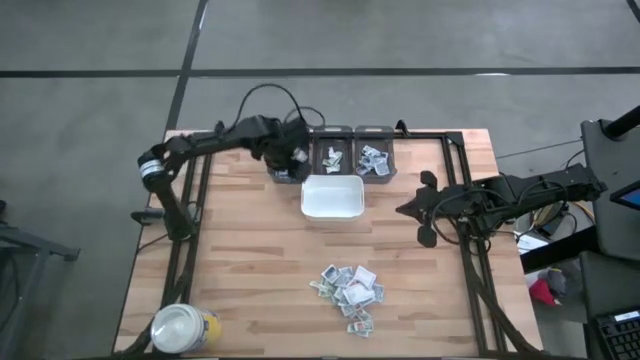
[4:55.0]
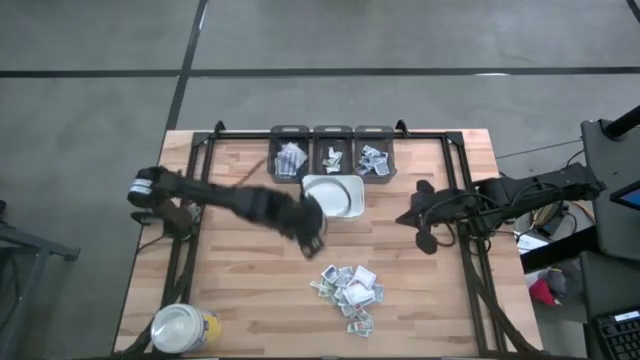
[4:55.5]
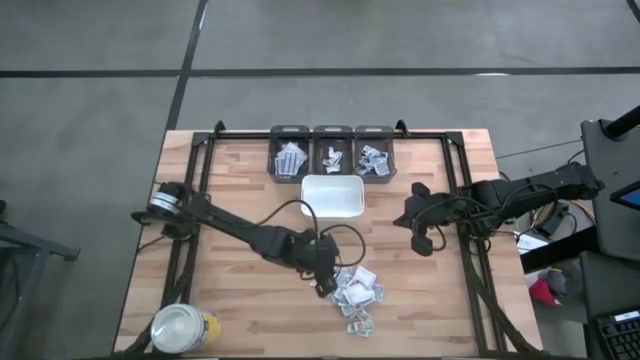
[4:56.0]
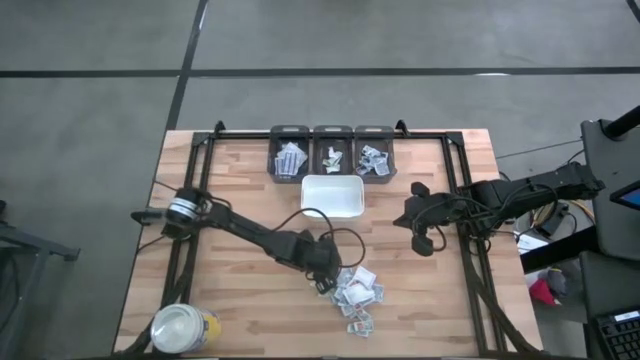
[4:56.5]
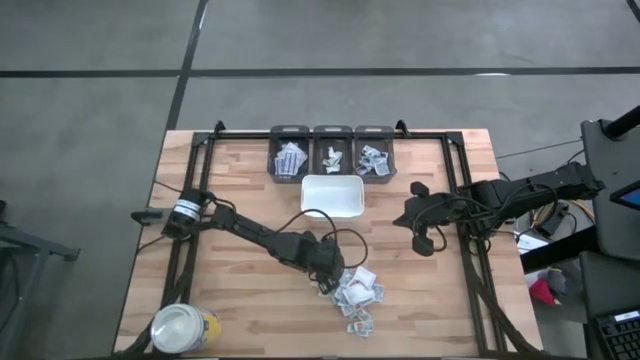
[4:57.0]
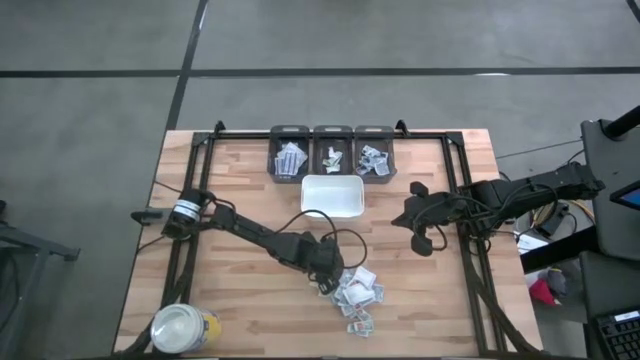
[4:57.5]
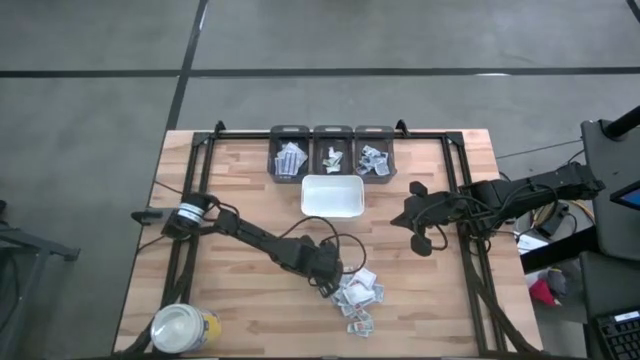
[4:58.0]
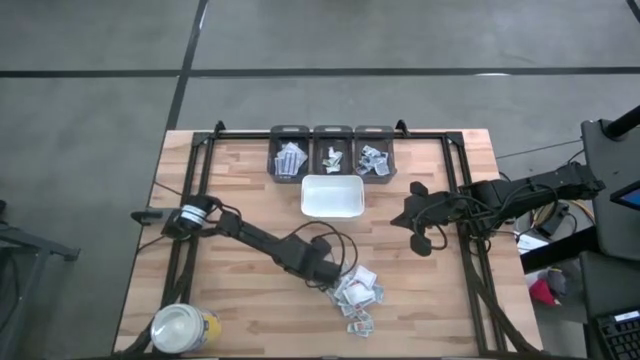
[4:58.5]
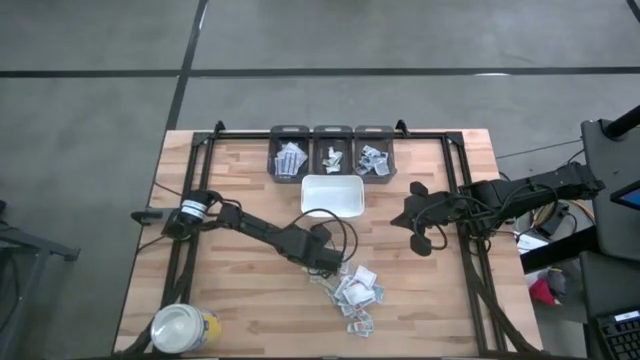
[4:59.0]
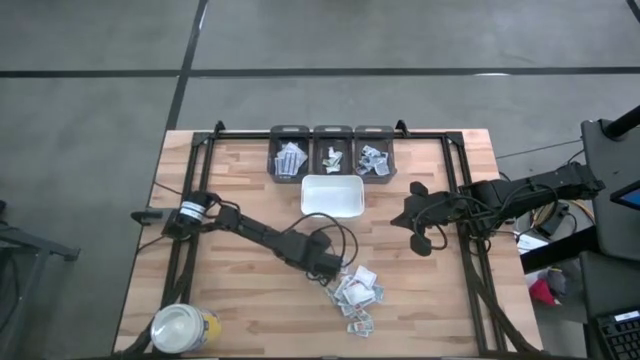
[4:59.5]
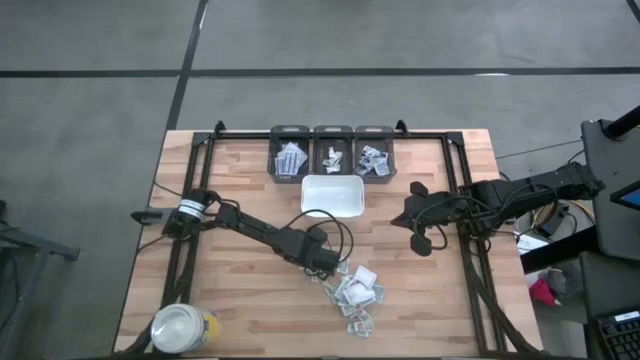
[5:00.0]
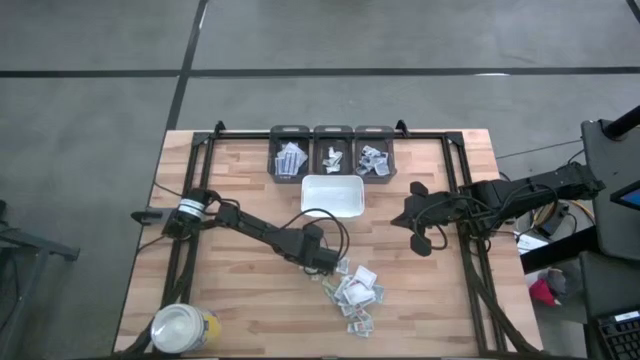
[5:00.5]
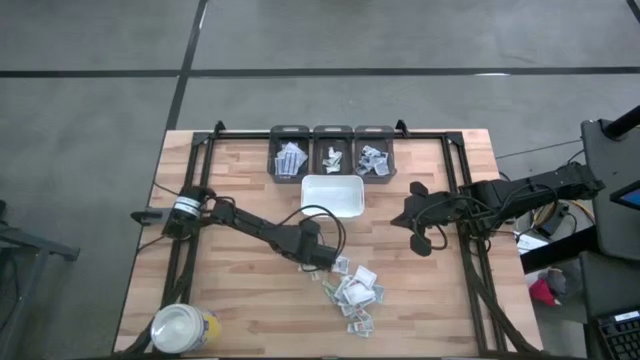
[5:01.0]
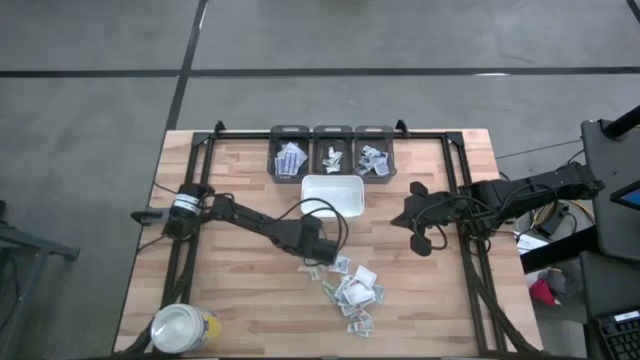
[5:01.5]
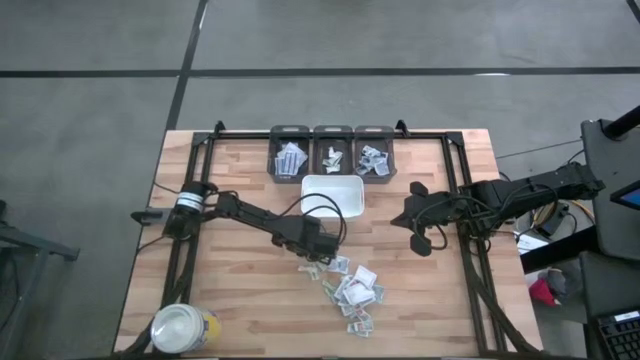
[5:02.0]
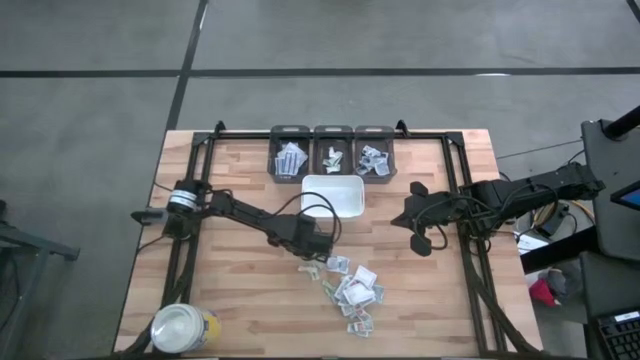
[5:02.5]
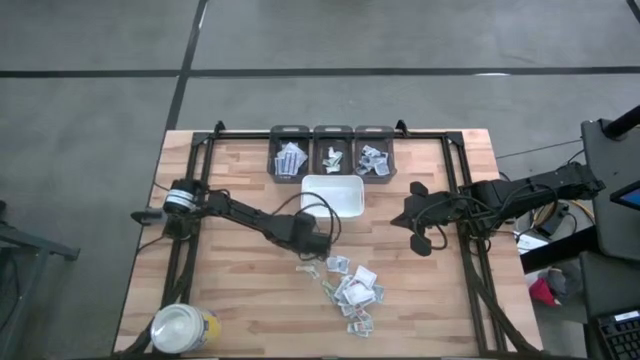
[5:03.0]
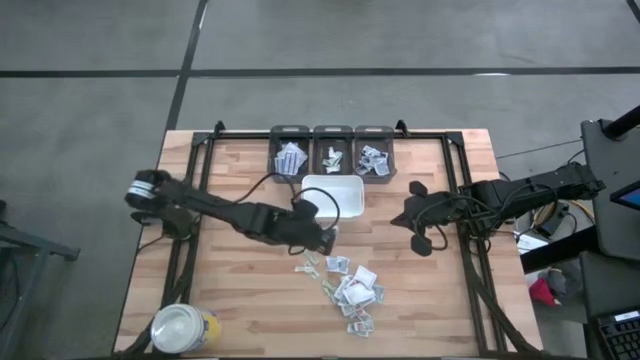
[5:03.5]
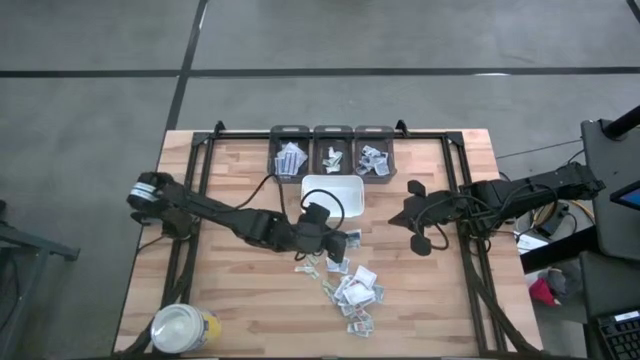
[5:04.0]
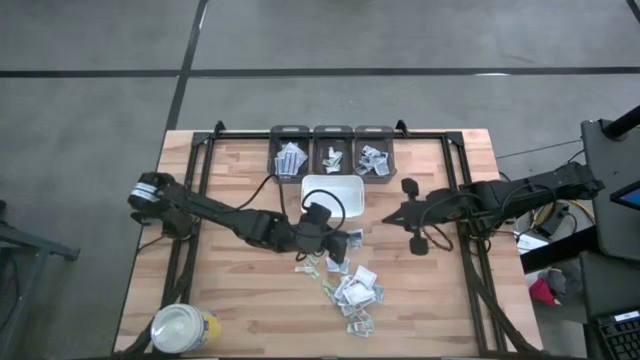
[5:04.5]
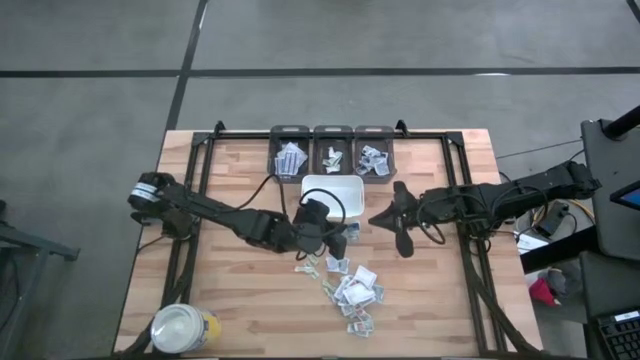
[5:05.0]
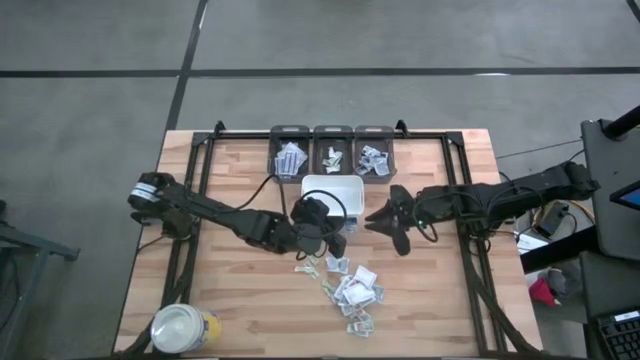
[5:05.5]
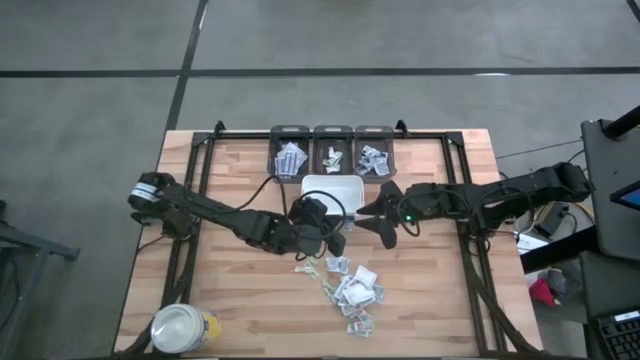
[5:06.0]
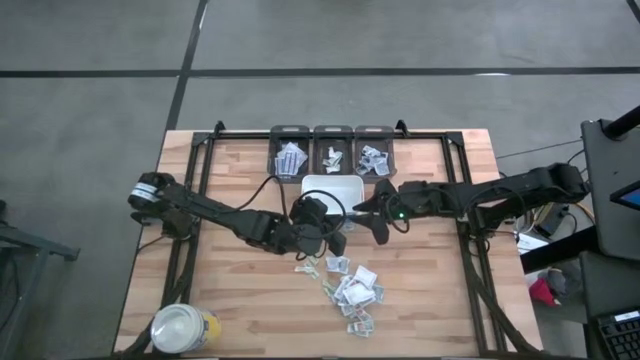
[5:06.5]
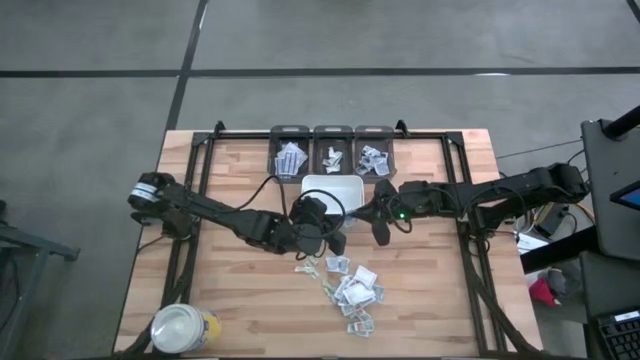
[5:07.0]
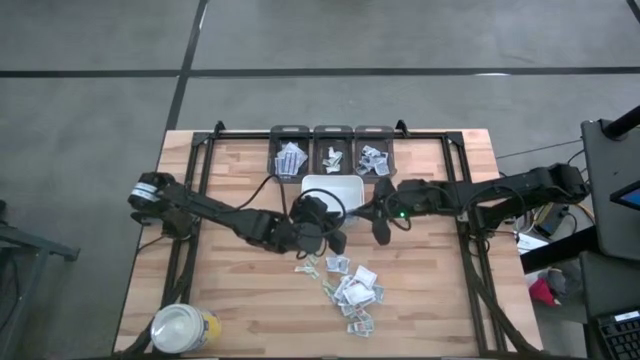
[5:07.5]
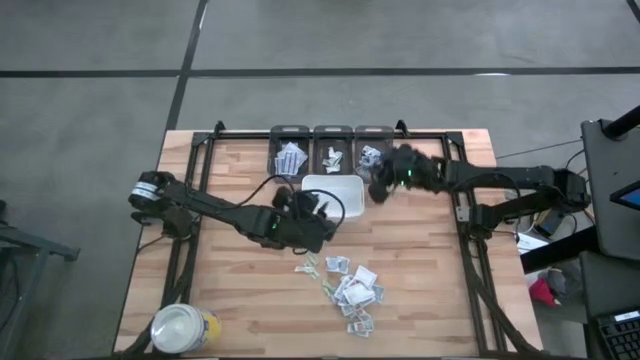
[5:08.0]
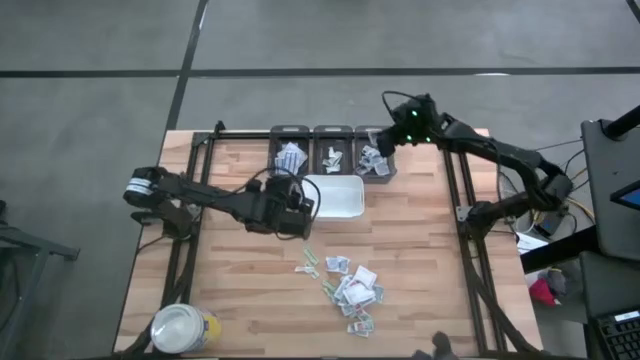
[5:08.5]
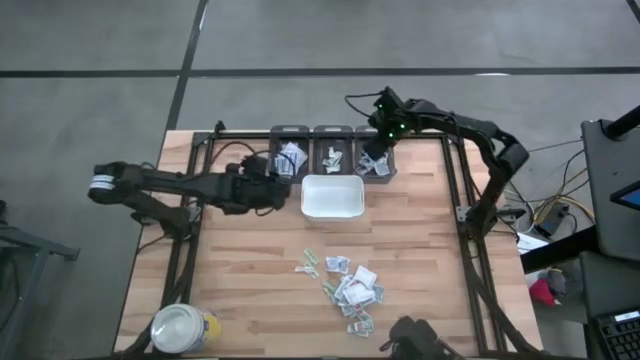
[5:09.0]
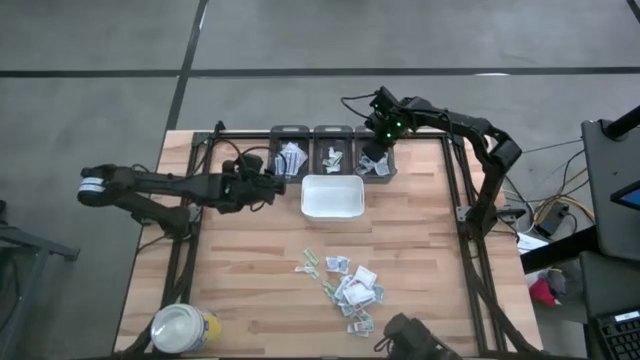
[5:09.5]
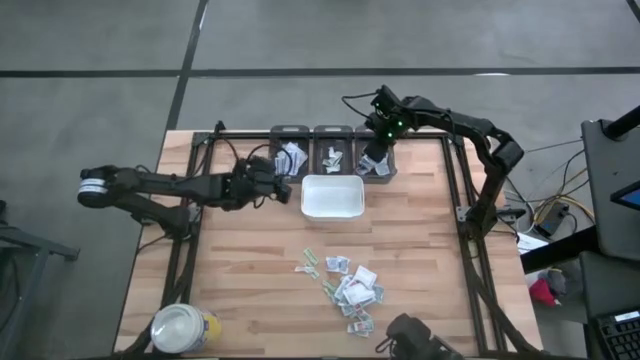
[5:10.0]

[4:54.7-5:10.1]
Task: Pick & Place First Aid Supplies
Put the white alcohol pad into the right black bin

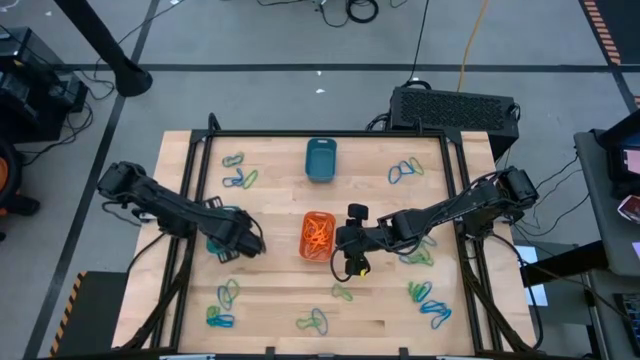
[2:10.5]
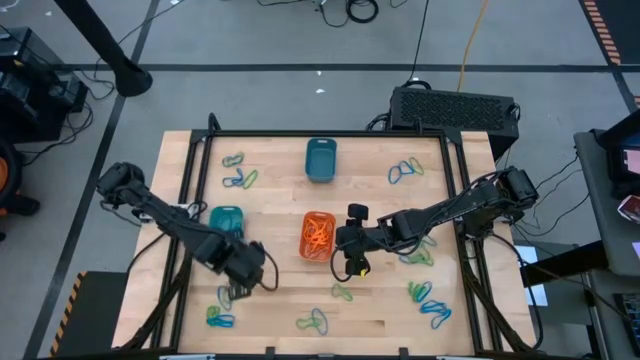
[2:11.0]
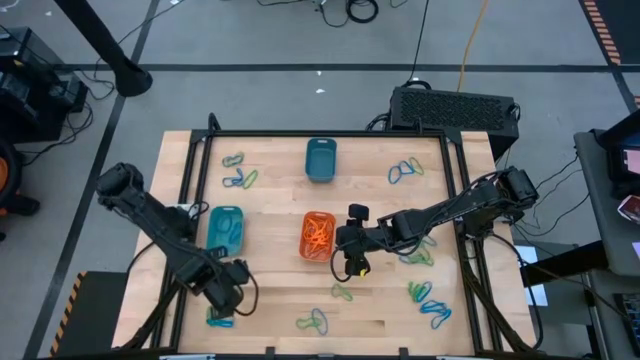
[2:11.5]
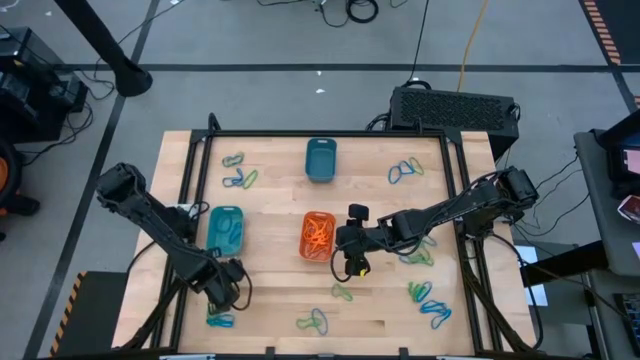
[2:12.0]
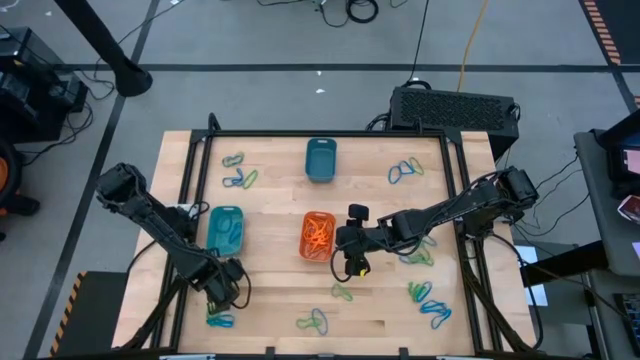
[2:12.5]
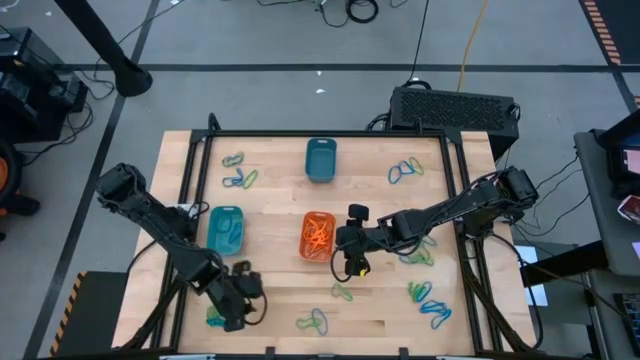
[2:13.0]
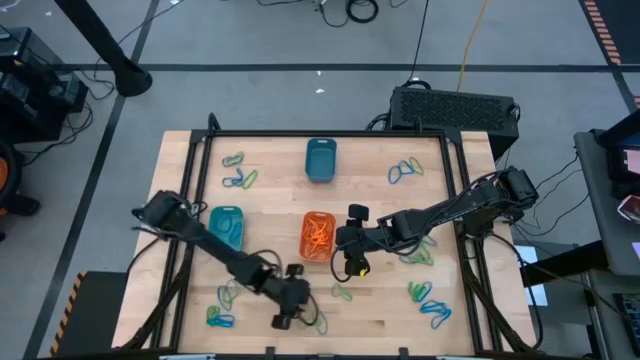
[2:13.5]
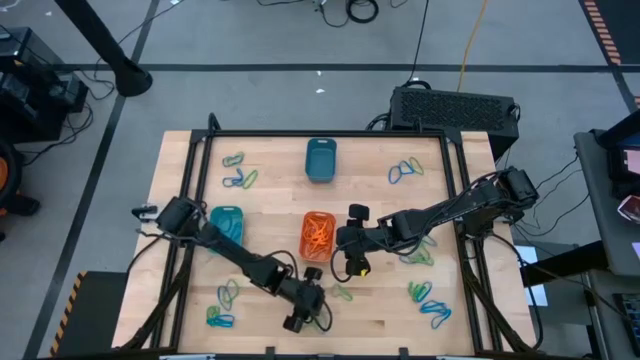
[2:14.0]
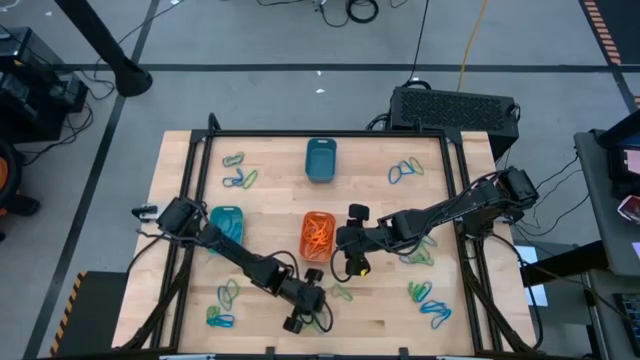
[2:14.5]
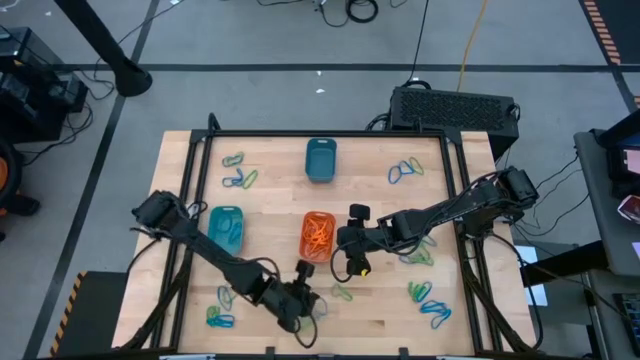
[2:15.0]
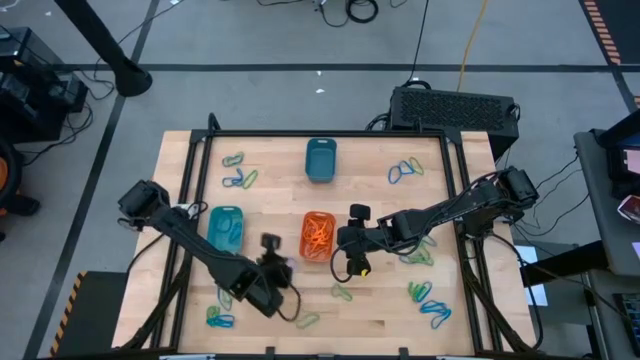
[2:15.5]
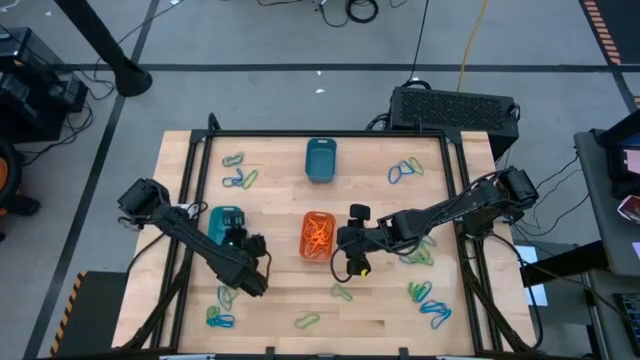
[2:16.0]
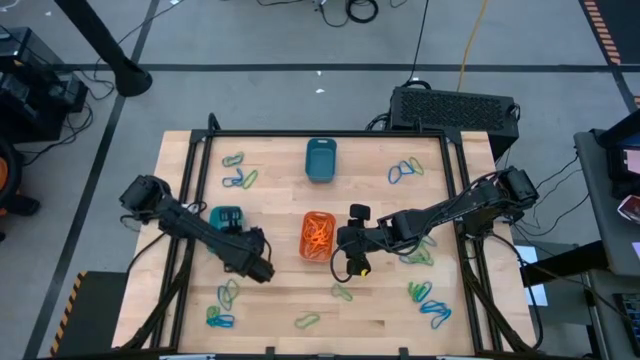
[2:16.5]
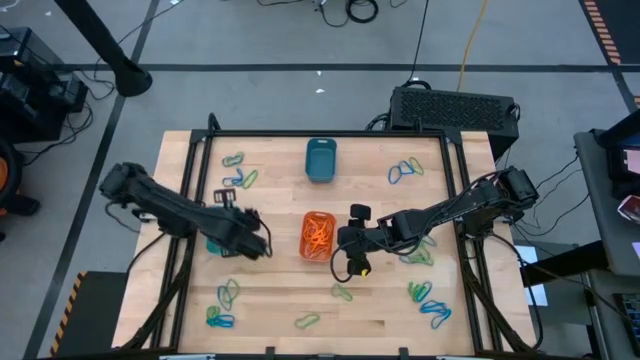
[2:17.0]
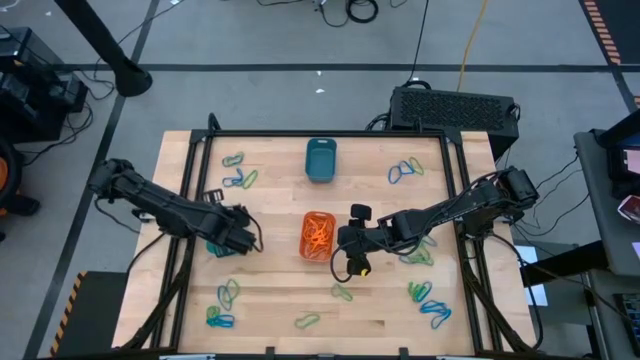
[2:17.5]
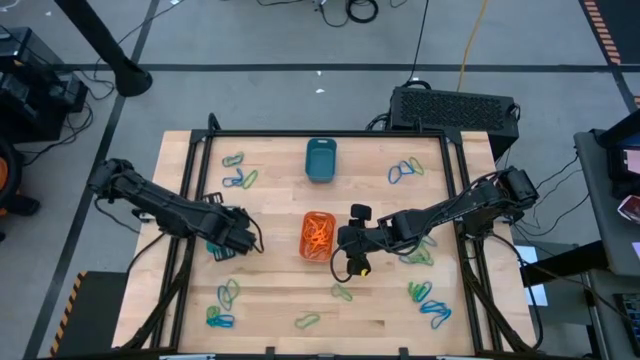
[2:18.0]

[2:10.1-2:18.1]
Task: Sort rubber bands into baskets
Put the blue rubber band into the green bin
